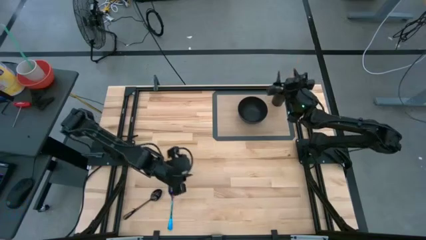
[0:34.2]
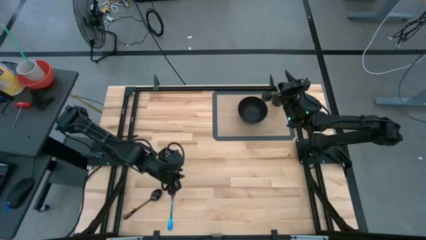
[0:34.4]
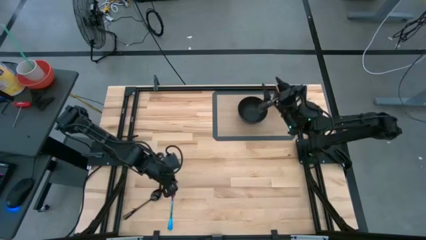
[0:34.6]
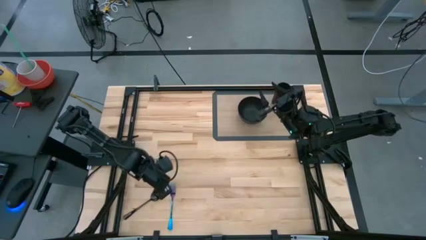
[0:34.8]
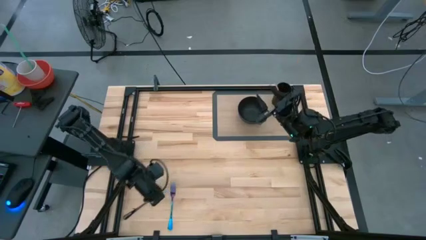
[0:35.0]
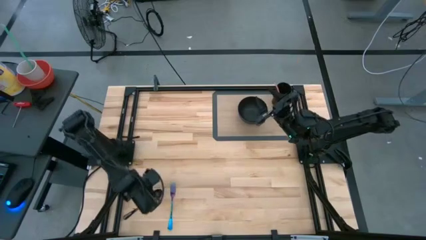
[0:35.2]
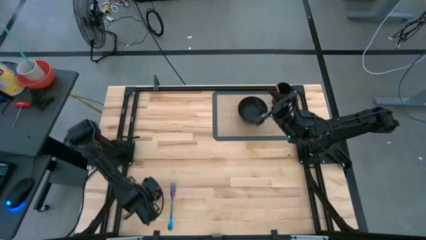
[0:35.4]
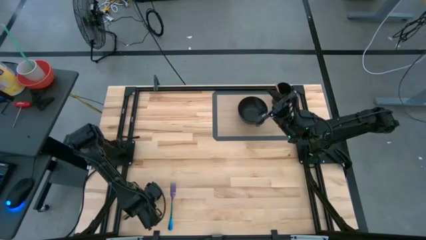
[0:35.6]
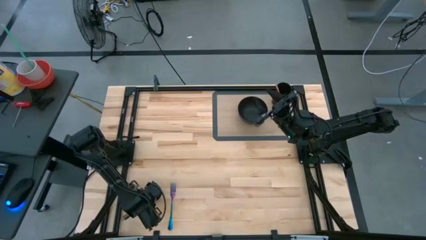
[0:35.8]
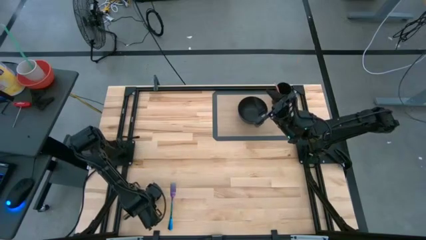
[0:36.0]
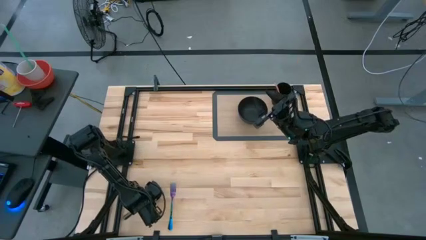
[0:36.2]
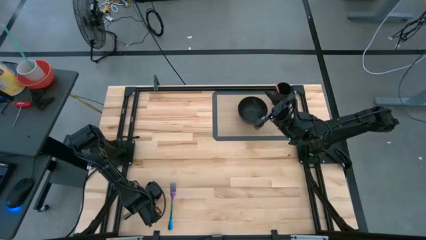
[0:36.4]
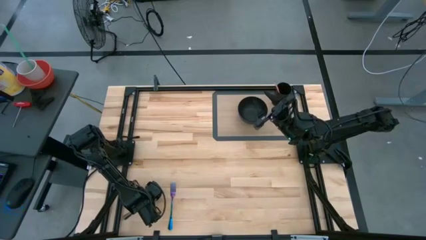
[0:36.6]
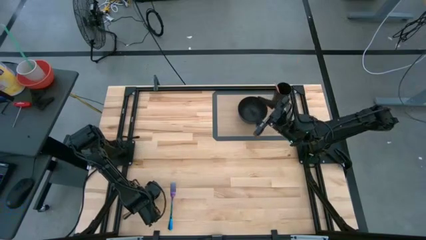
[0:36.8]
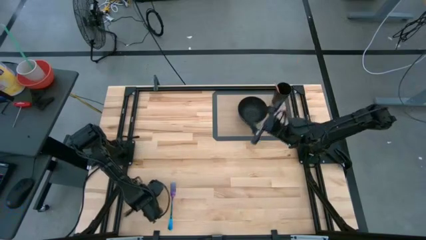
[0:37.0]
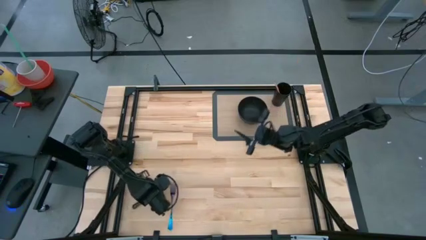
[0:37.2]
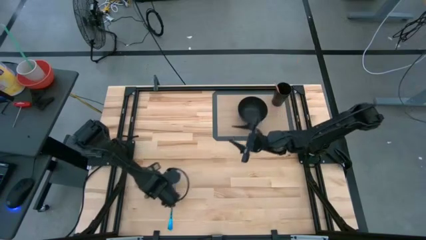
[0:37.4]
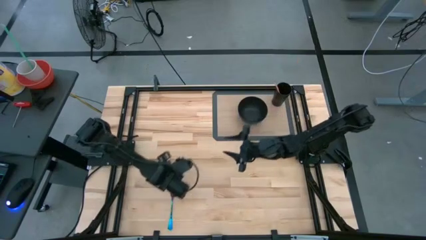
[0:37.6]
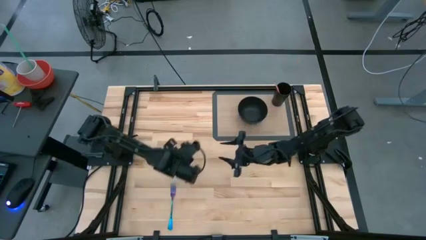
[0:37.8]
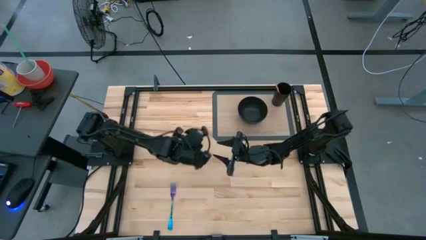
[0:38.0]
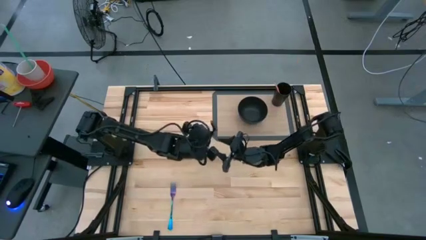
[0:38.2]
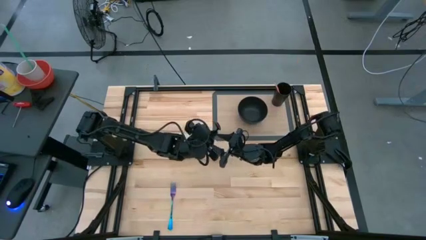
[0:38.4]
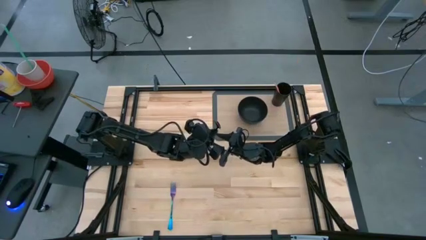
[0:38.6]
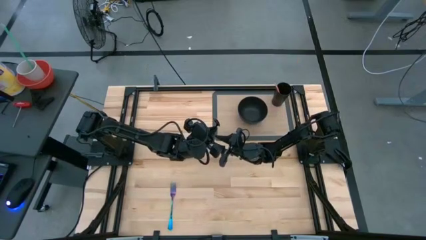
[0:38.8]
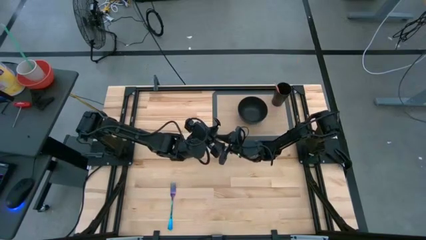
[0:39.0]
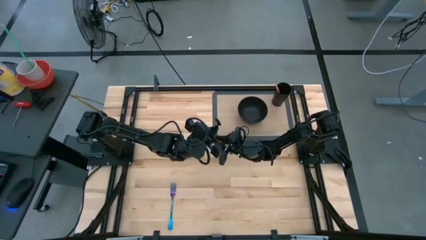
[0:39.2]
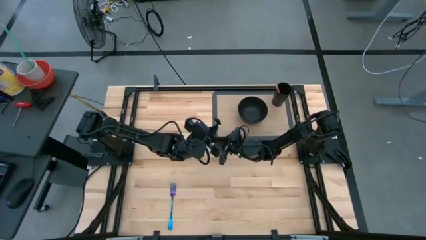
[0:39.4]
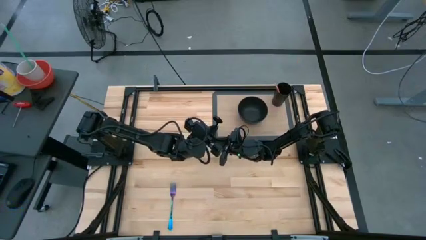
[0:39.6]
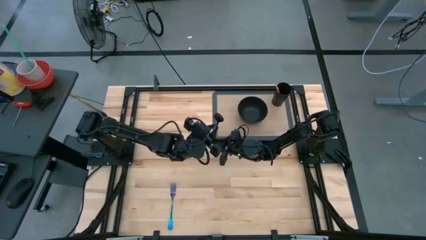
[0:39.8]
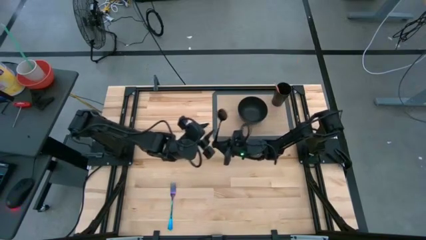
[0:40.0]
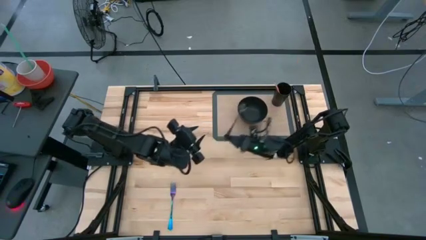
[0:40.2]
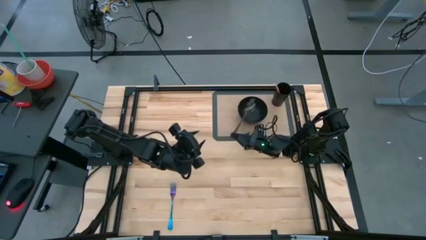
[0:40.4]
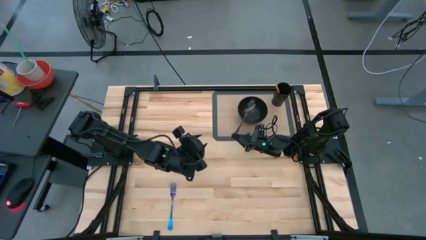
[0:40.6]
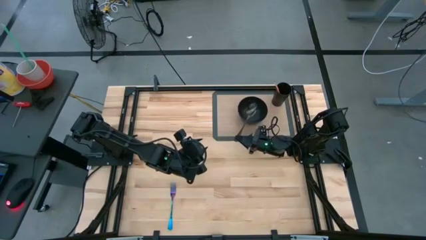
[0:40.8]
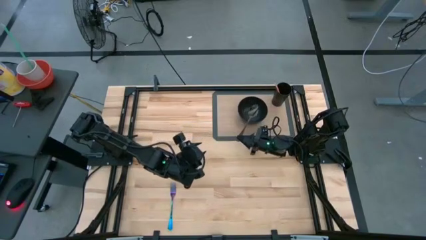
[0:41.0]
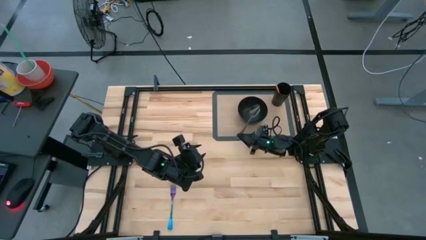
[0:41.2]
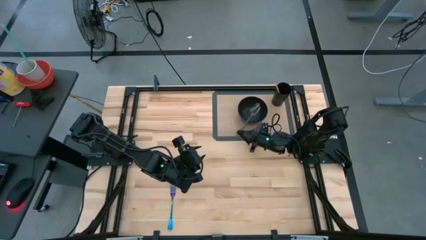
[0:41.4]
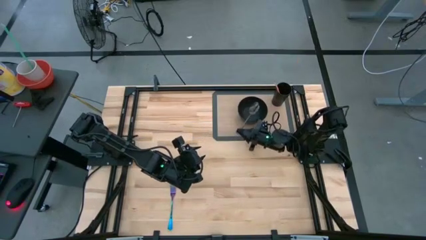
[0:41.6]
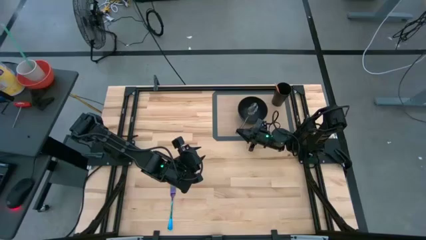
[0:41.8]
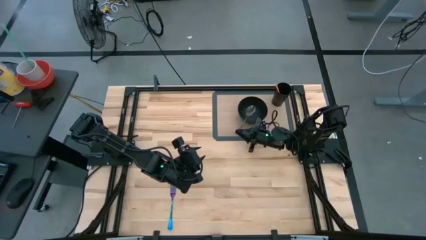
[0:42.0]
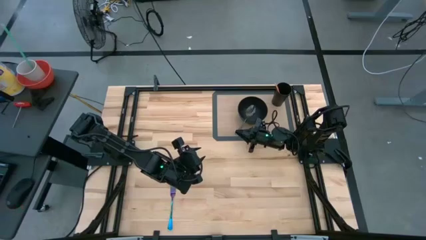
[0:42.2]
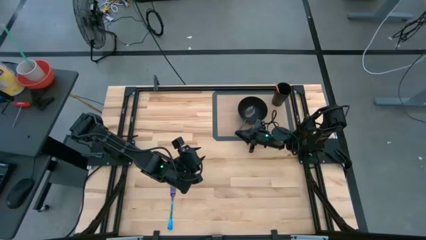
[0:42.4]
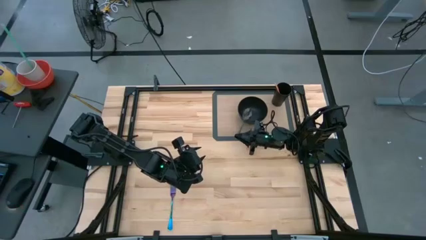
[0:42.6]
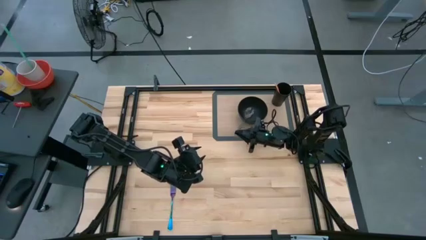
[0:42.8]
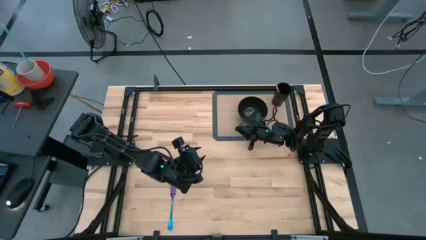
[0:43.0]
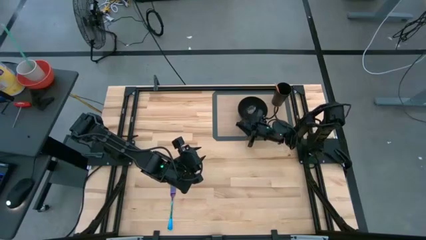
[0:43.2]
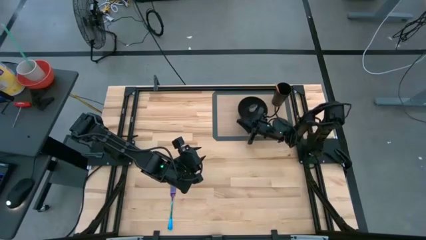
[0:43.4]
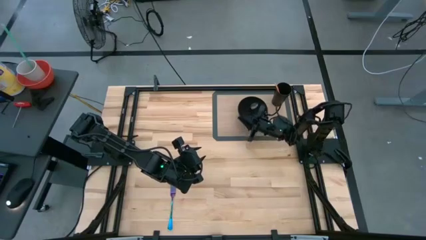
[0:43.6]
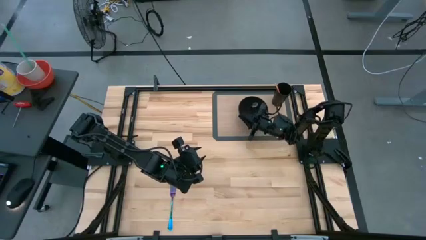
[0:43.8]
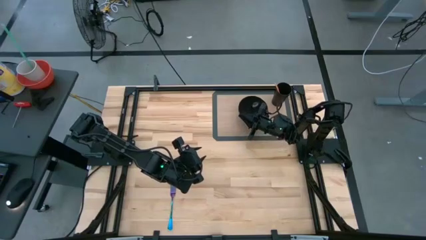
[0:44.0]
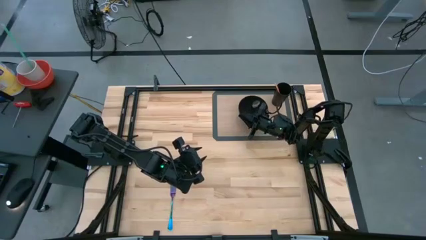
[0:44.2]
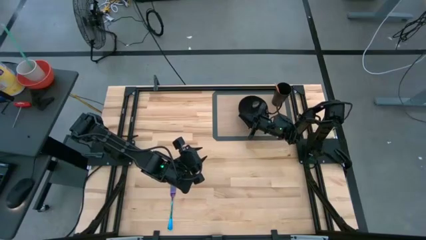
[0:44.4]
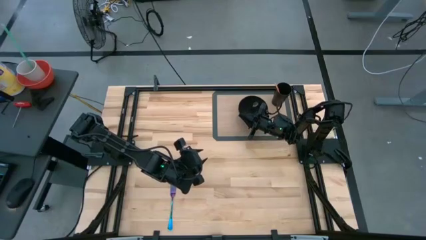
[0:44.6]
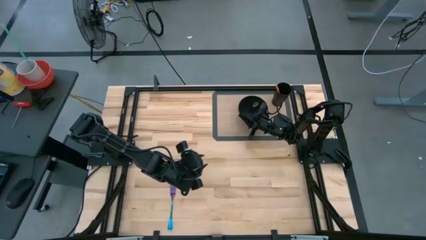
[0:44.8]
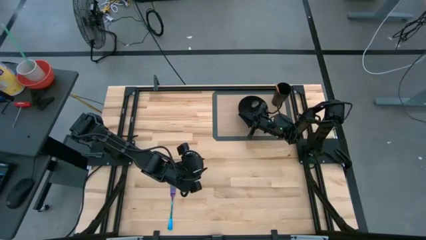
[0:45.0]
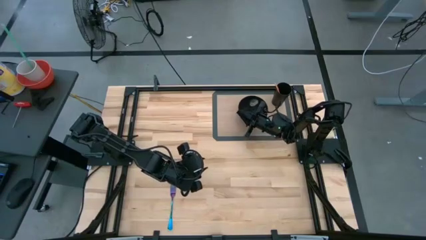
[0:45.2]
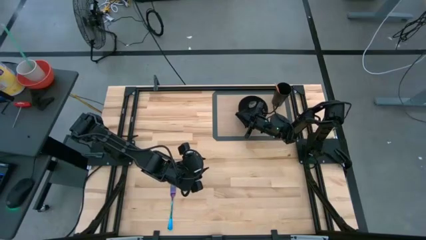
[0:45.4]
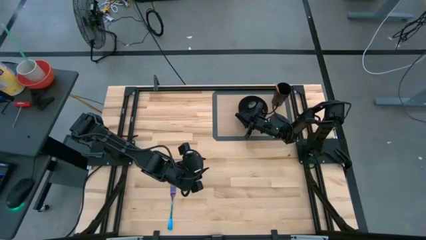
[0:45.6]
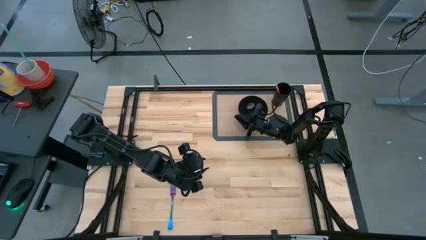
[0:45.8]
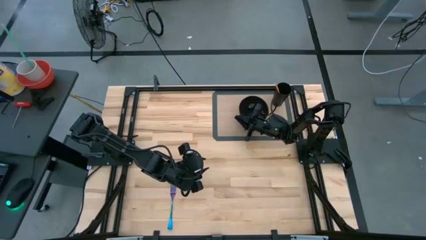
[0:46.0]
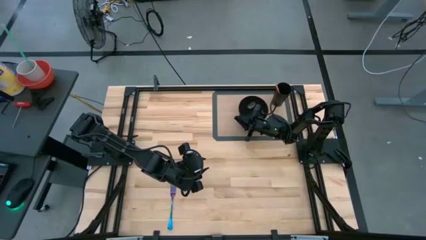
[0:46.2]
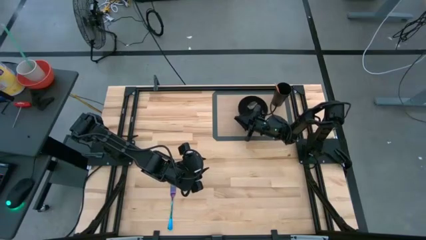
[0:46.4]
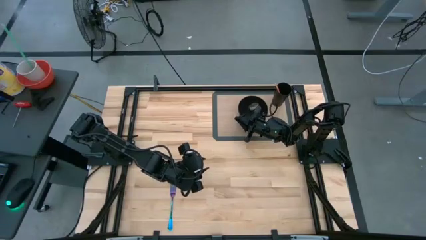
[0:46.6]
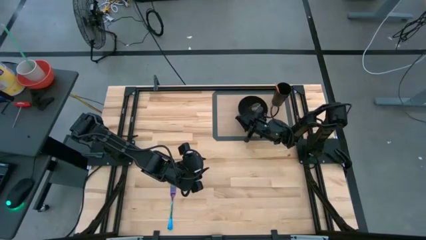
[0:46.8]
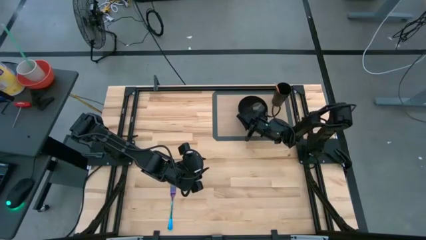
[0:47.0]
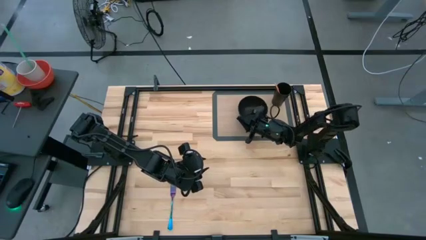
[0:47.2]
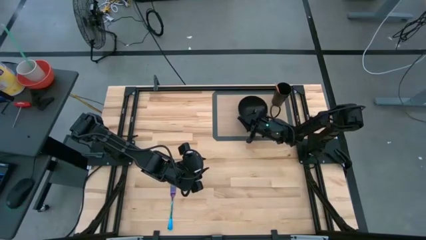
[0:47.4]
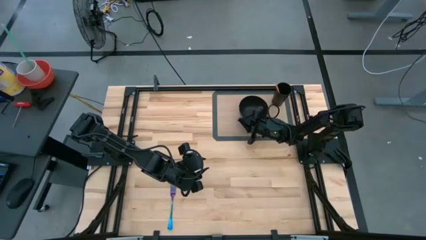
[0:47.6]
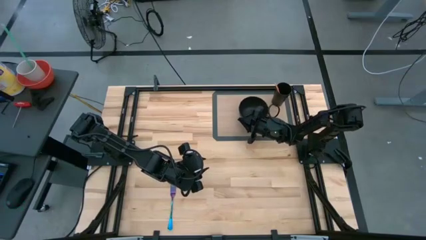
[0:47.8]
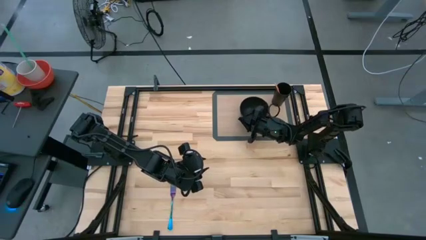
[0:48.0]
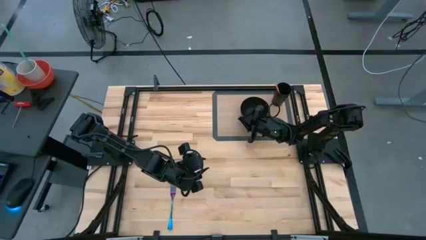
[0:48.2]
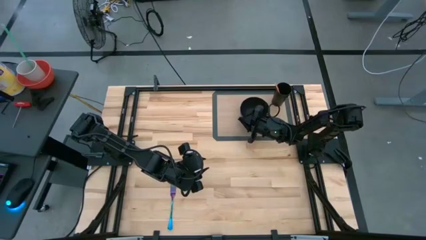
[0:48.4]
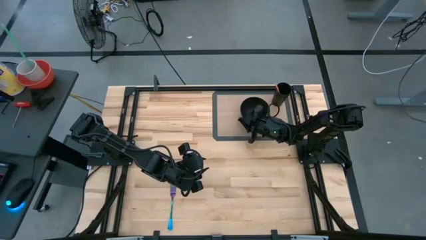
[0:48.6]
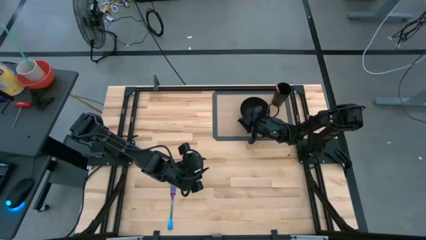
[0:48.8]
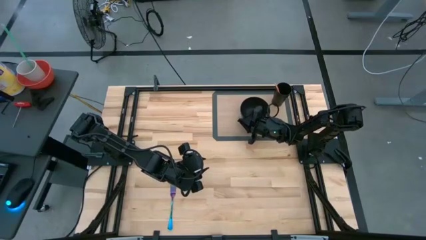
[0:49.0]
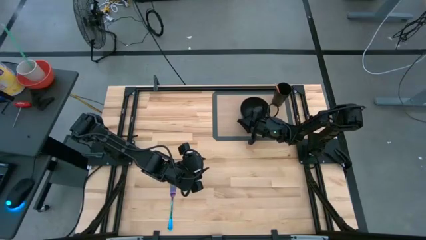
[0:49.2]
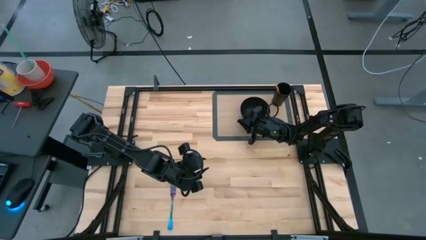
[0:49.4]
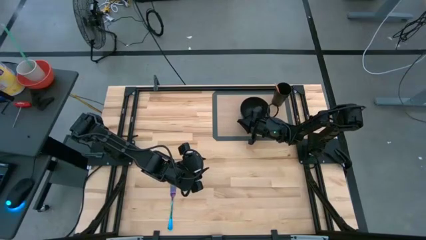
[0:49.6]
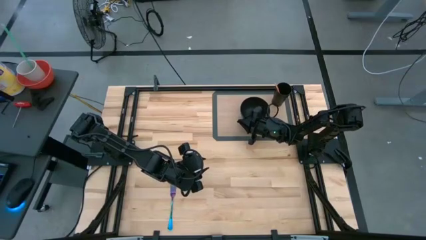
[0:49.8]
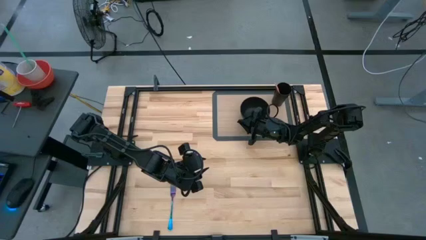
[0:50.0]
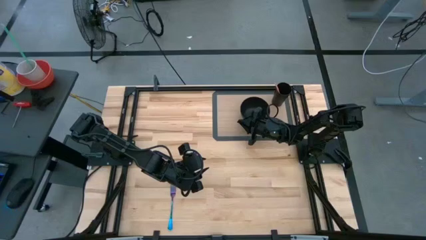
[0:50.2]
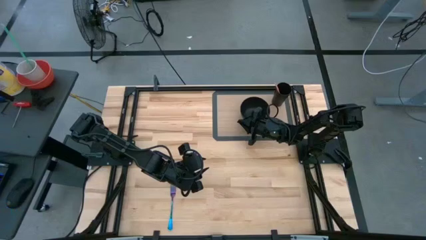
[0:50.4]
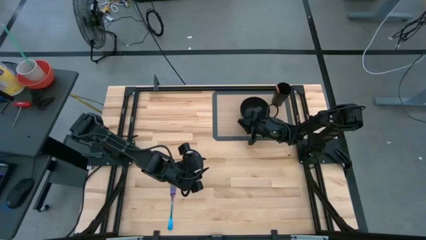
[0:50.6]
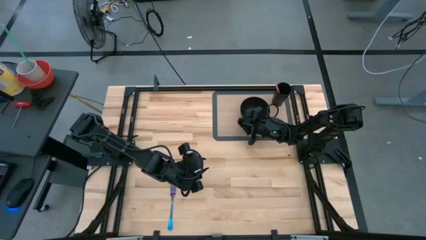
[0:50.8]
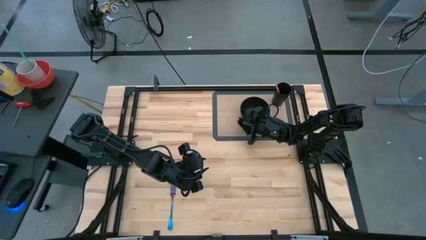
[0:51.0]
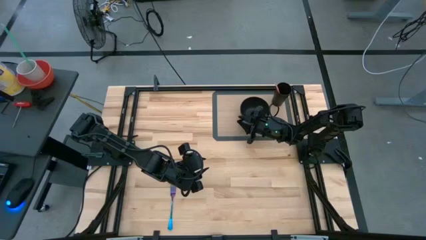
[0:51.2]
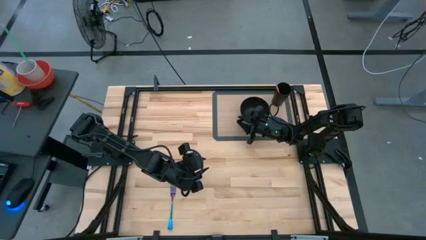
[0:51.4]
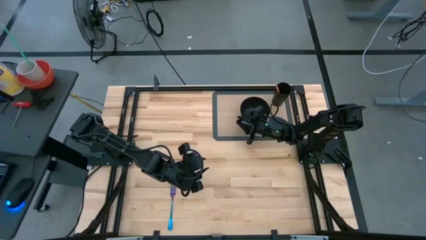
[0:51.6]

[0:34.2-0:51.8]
Task: Pick & Place Utensil
Put the black spoon into the black bowl on the transparent mat
